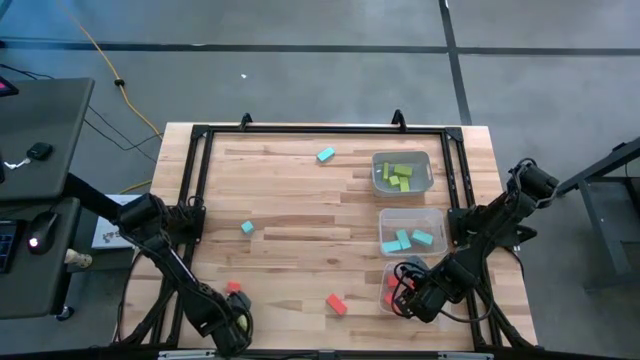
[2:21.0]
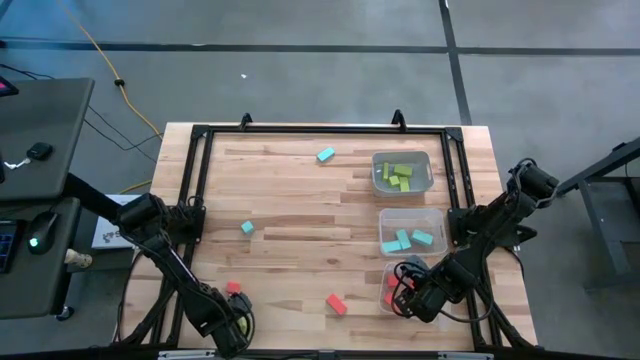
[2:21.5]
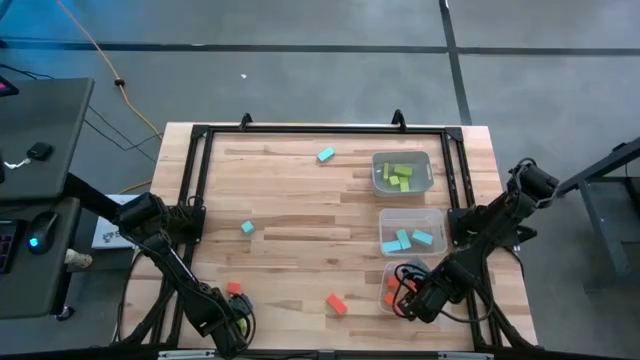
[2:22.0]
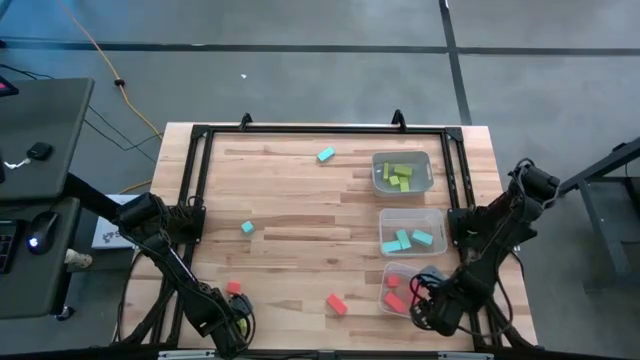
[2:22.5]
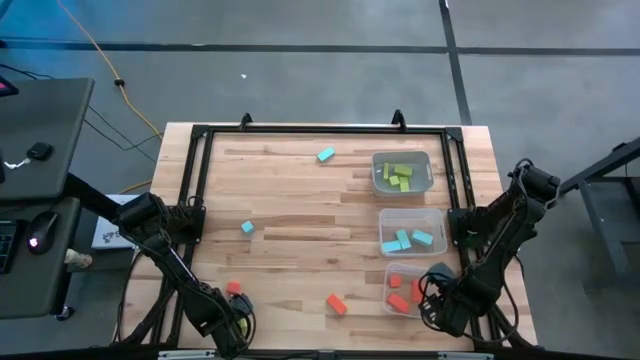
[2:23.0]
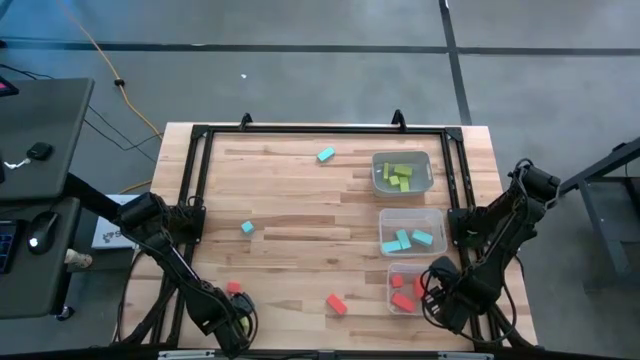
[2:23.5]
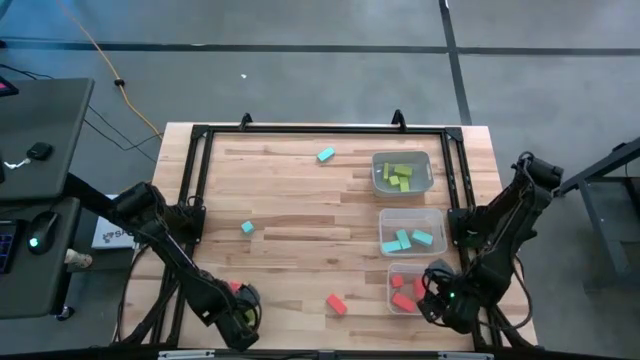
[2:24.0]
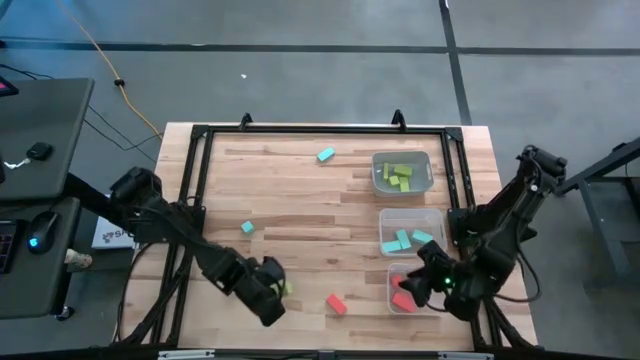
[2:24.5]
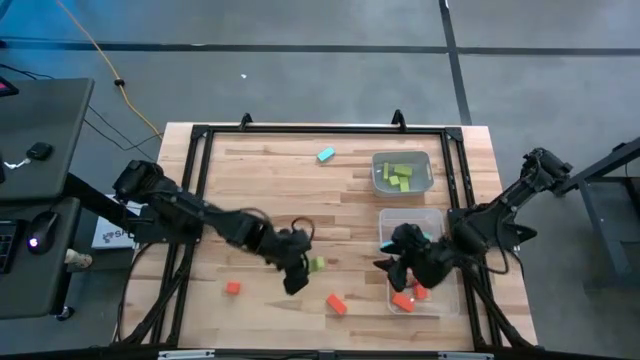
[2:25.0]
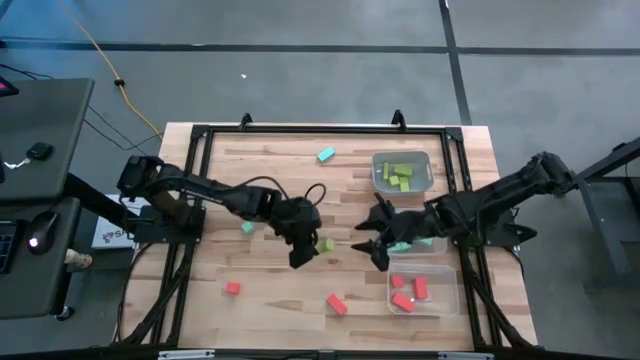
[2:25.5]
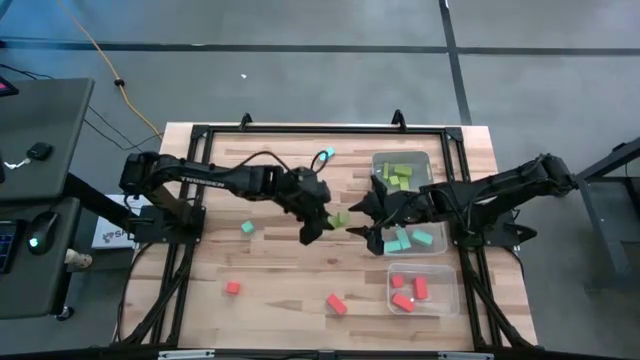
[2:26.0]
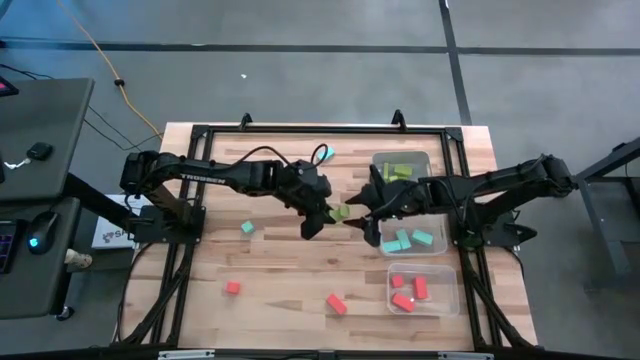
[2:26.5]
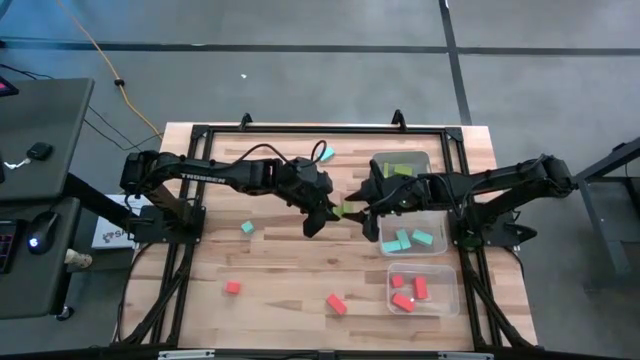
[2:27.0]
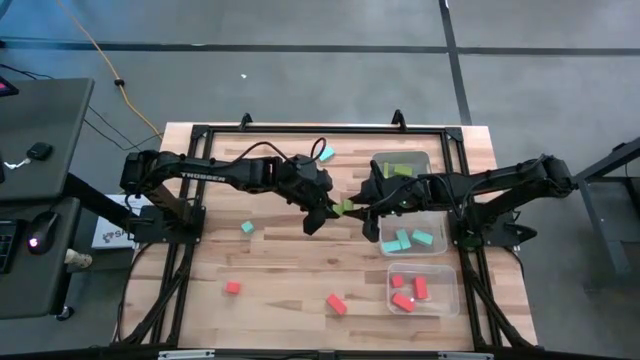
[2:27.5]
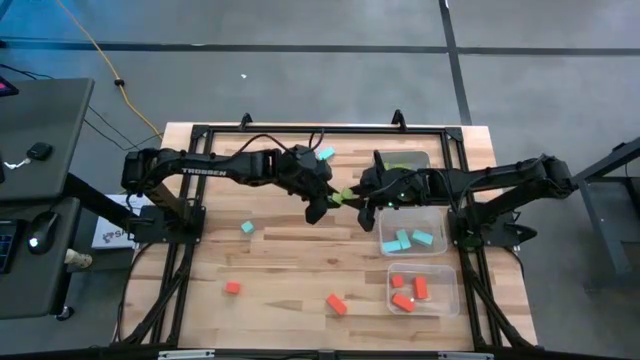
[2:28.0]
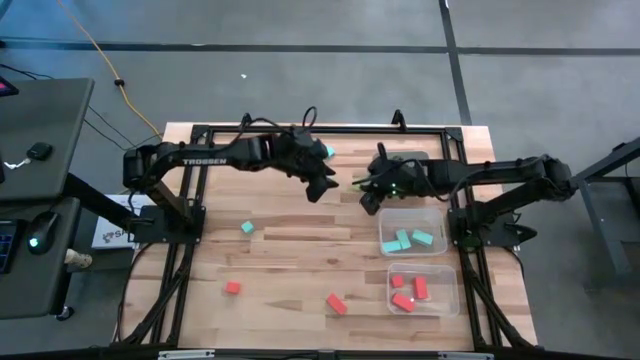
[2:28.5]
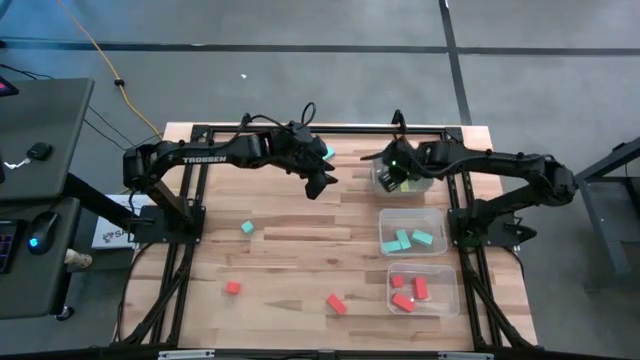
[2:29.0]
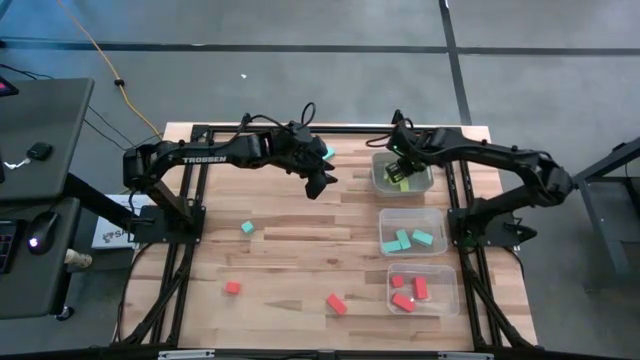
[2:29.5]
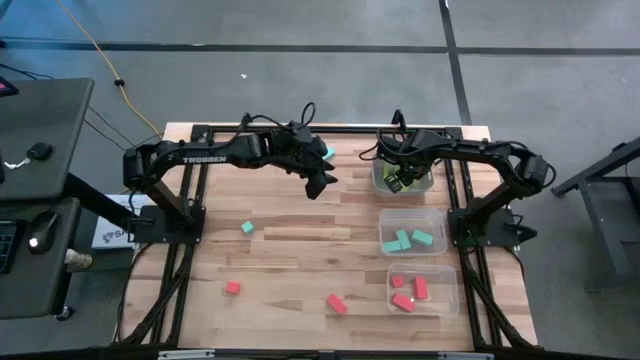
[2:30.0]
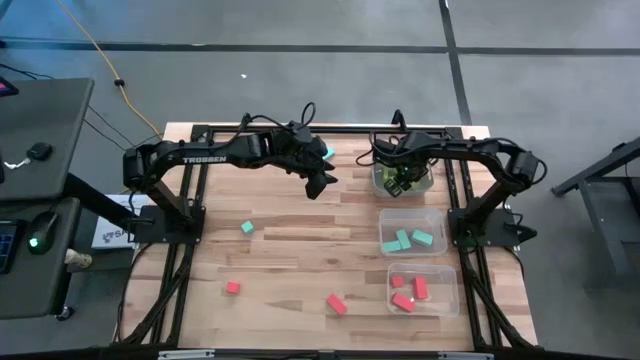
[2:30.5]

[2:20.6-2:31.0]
Task: Sort & place blocks by color
Put the light green arch block into the gray bin

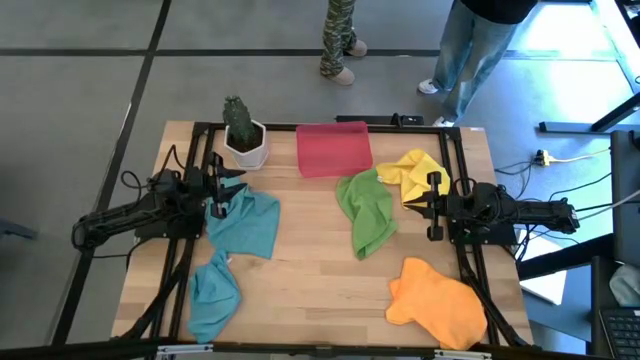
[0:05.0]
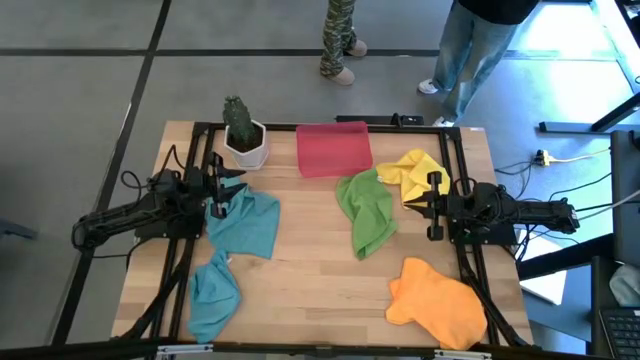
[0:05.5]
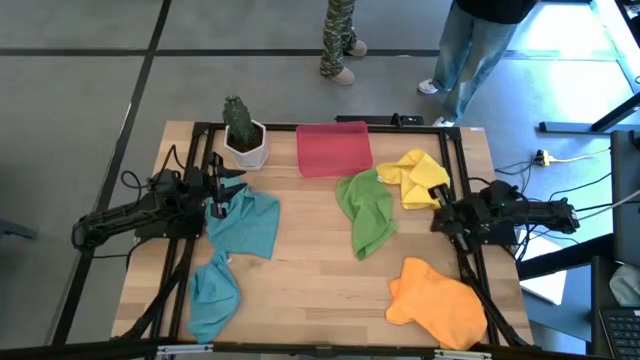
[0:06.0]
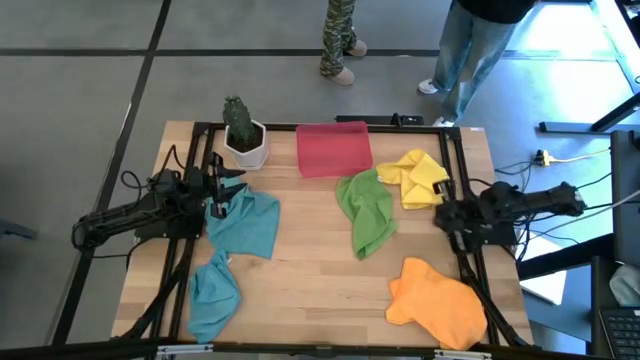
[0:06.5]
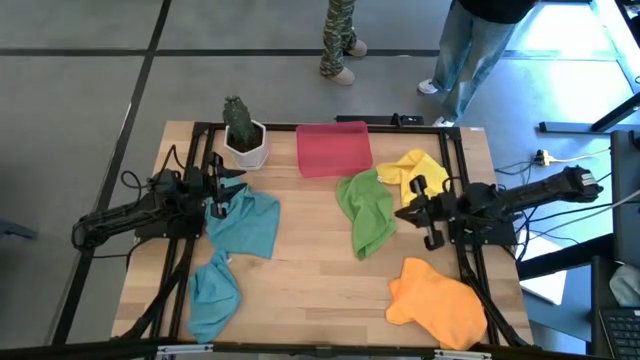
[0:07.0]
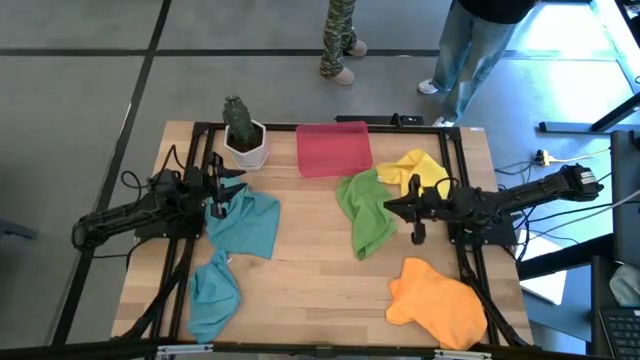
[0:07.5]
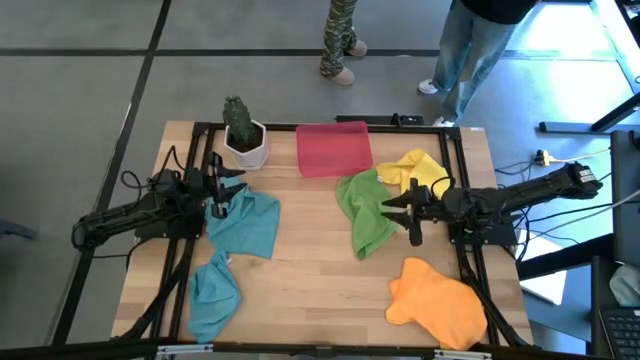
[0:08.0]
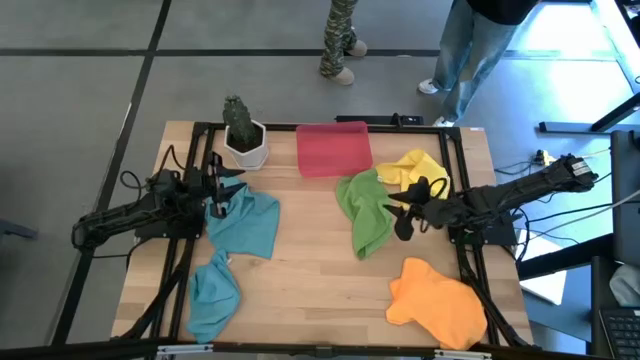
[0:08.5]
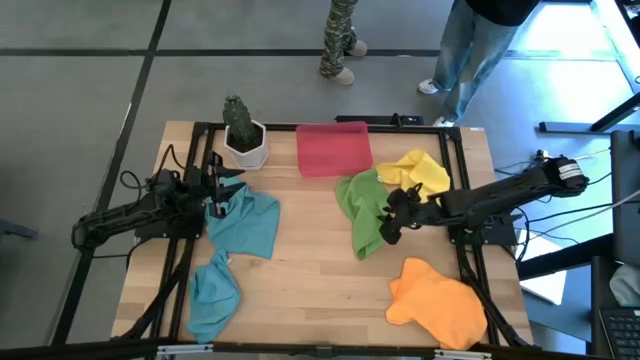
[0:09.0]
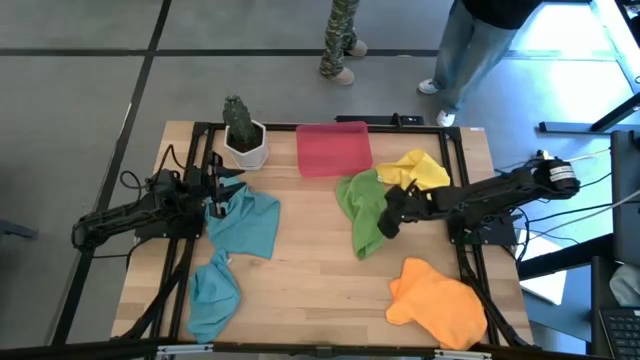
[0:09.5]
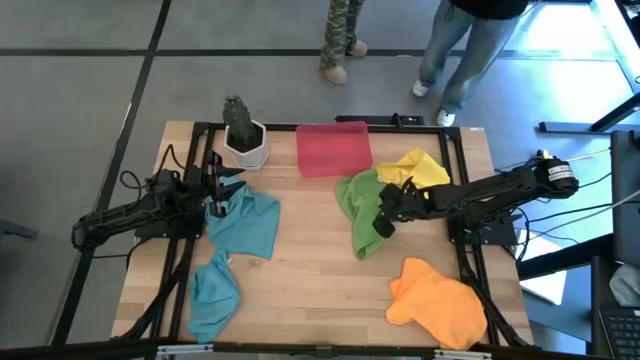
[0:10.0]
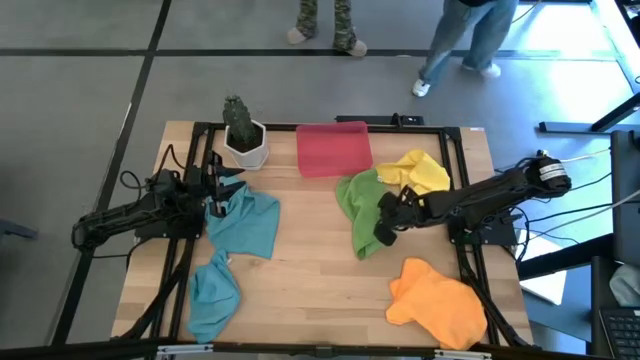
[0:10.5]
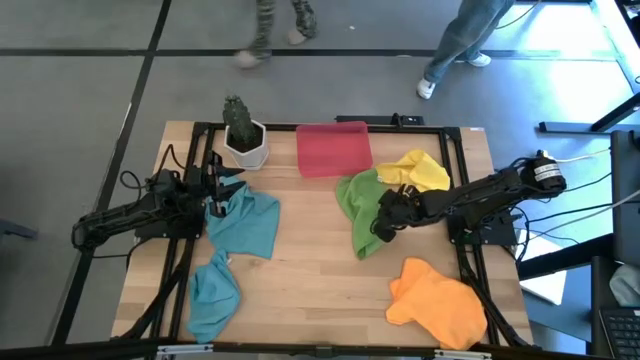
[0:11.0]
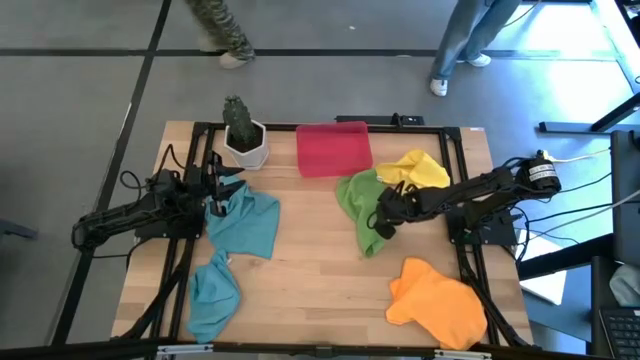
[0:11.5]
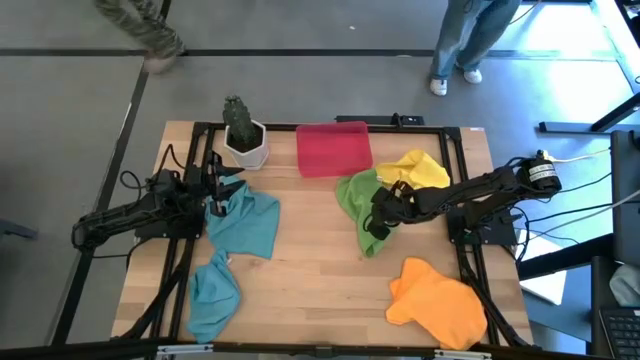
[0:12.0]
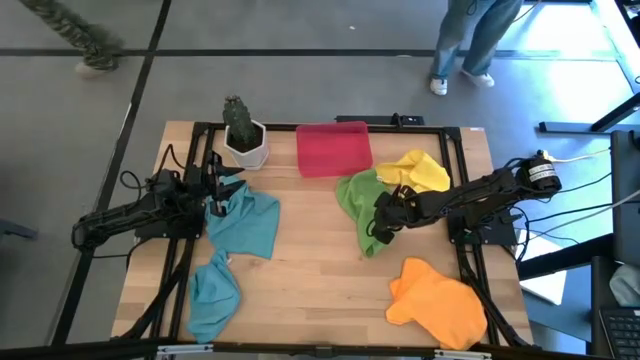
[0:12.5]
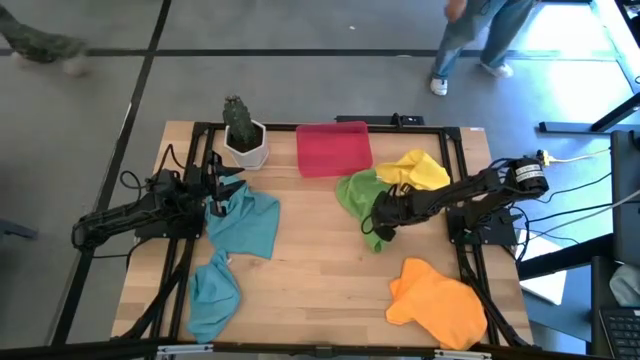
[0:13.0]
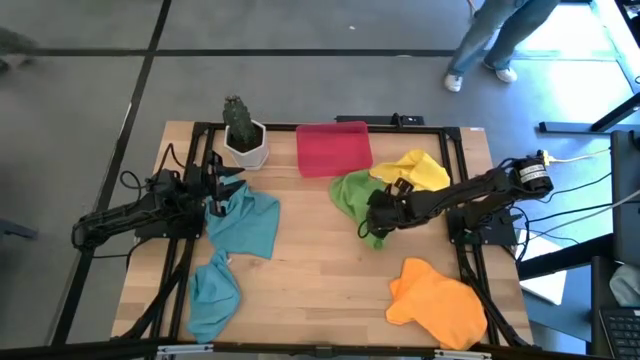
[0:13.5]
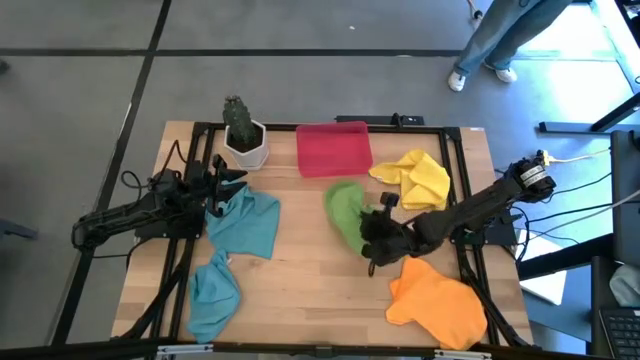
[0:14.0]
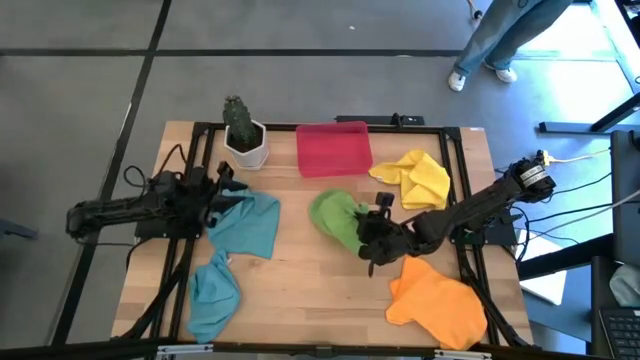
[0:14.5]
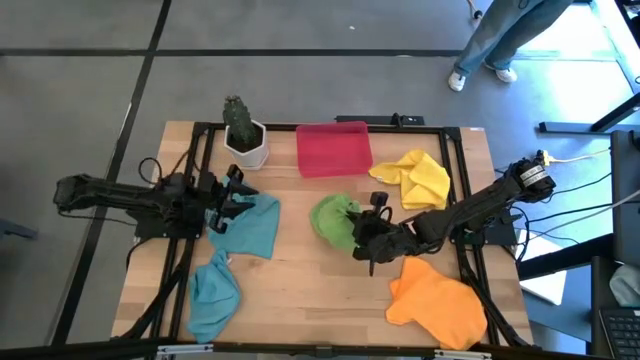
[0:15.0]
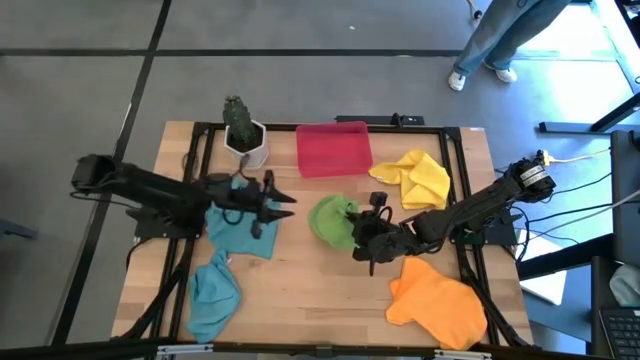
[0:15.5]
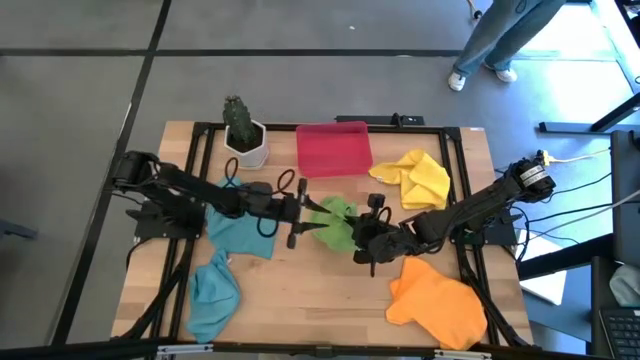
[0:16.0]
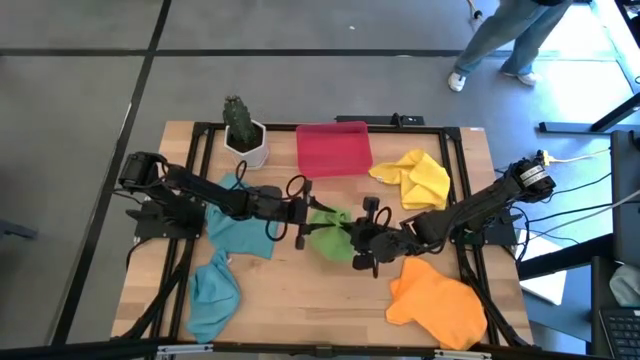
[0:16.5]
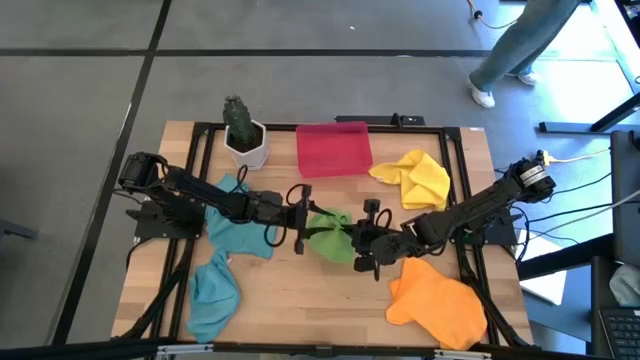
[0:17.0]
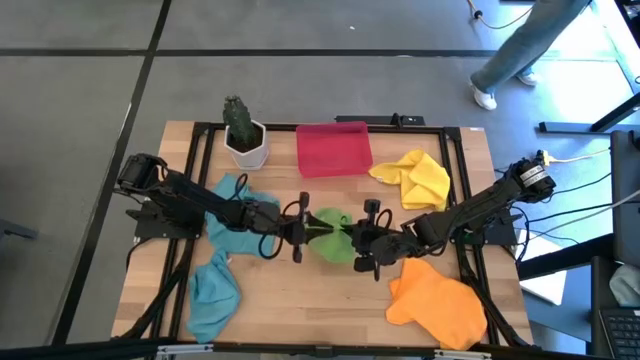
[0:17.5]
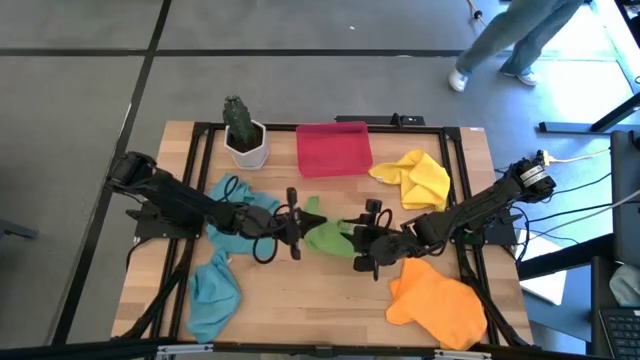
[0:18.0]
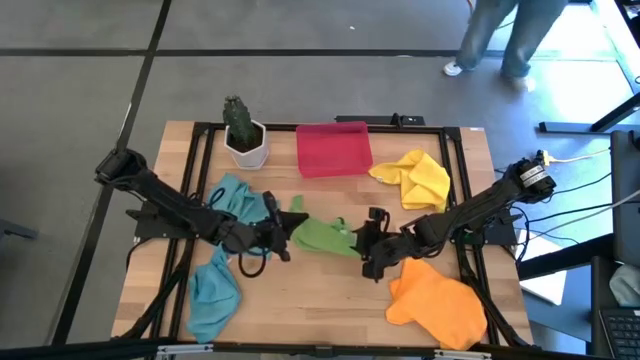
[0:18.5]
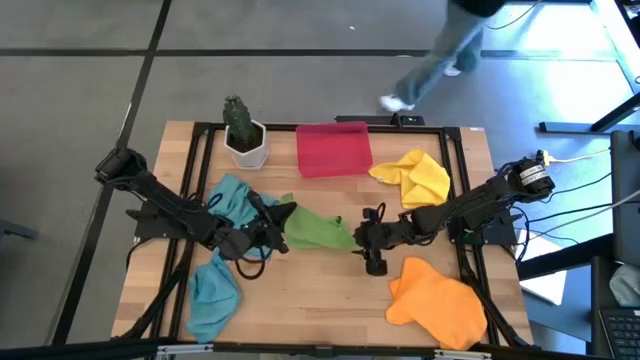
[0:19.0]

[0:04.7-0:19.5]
Task: Fold microfiber towels
Fold the green microfiber cloth
